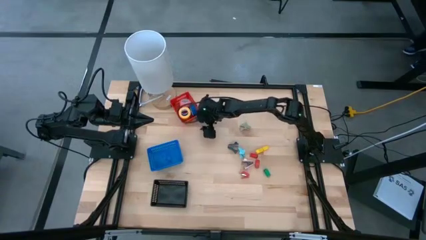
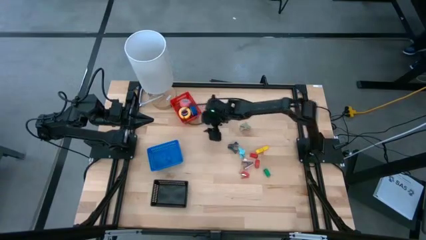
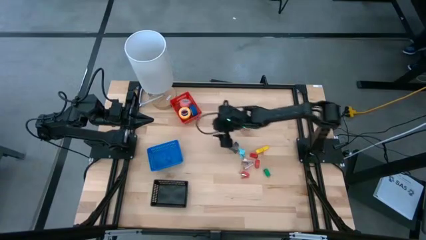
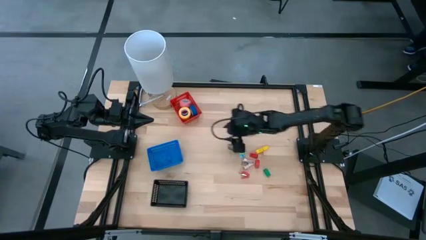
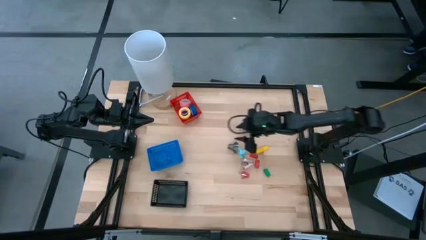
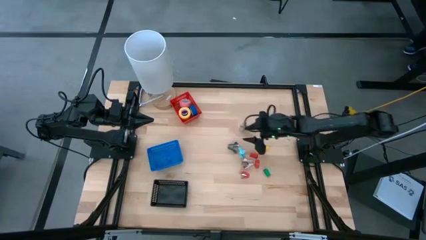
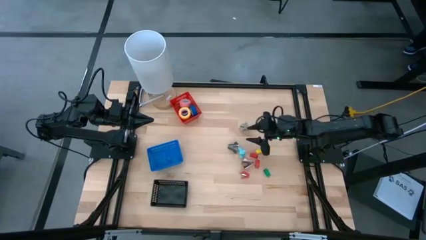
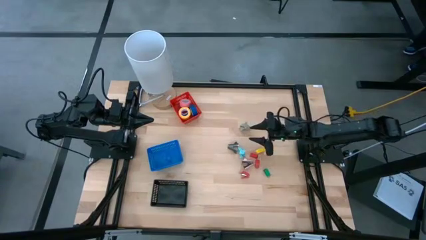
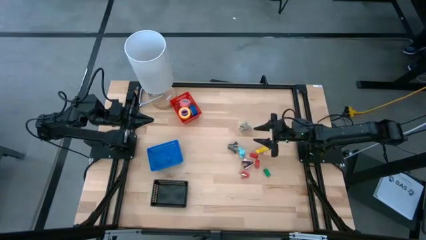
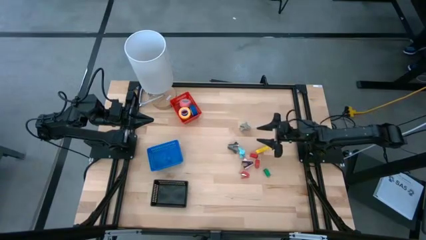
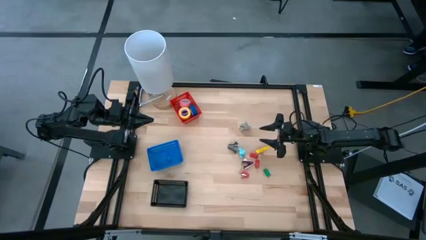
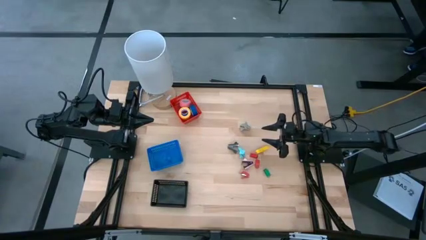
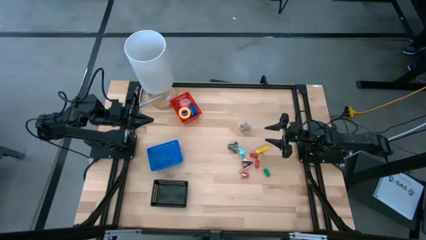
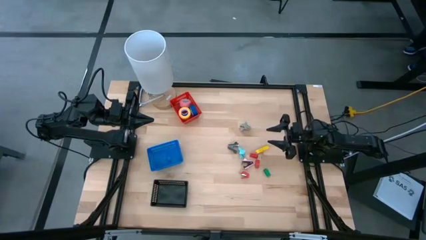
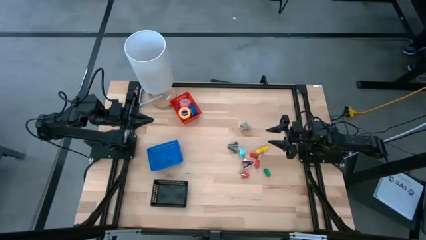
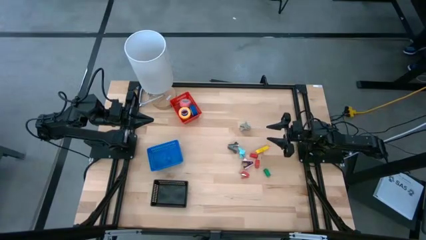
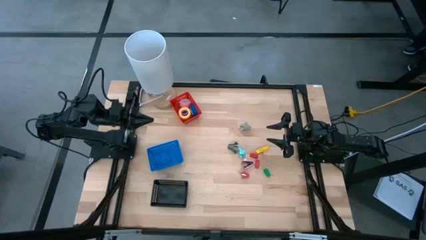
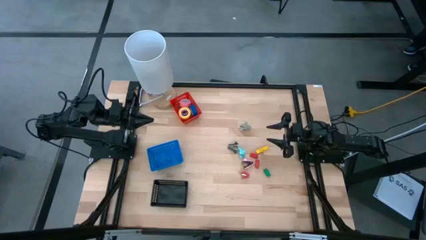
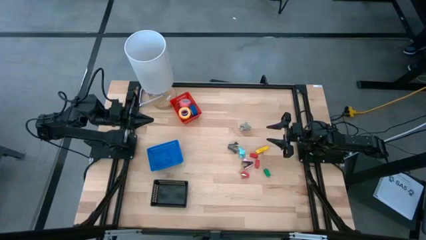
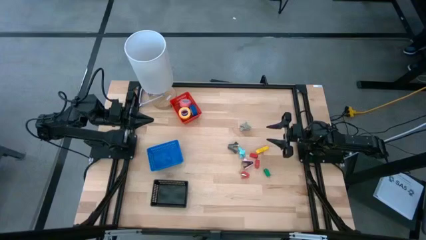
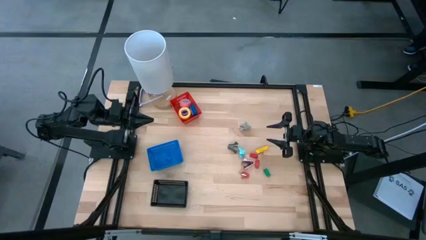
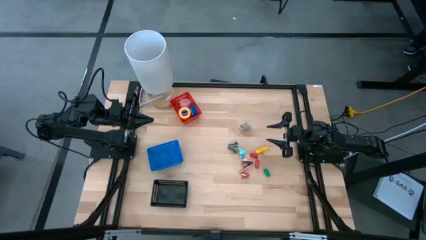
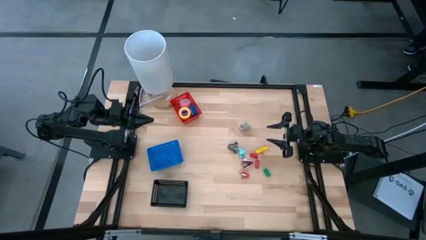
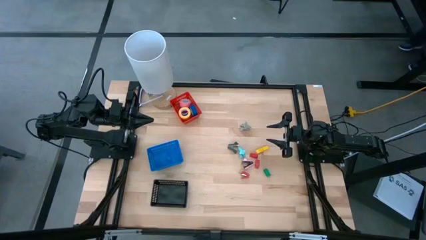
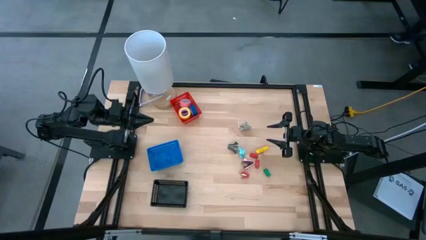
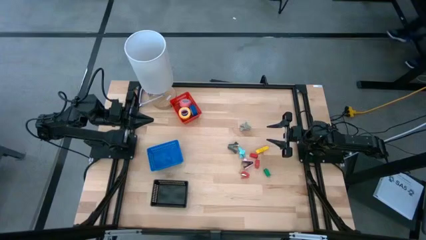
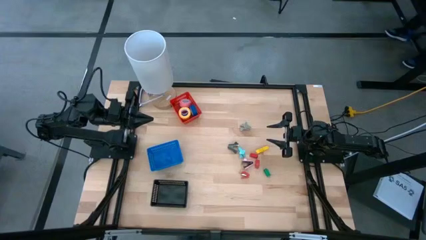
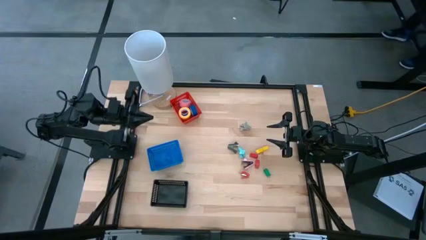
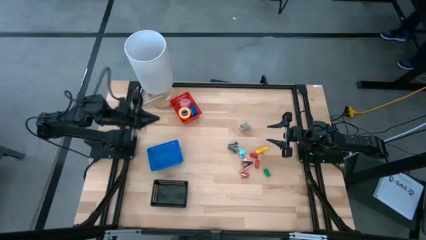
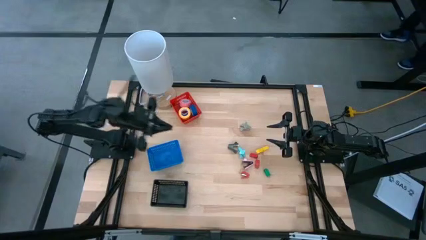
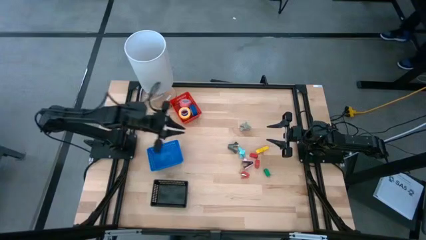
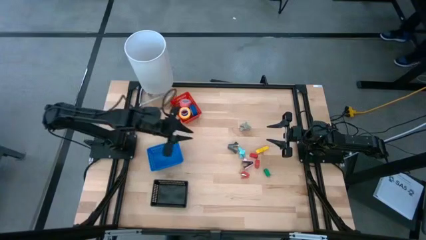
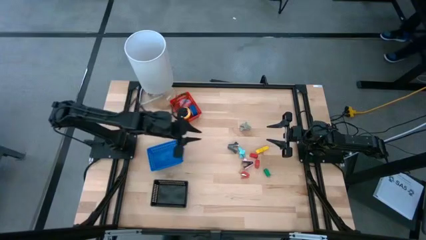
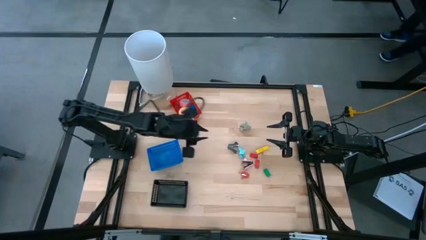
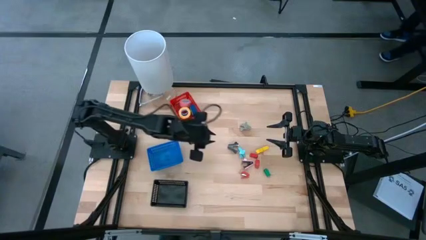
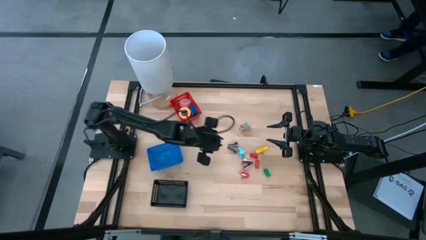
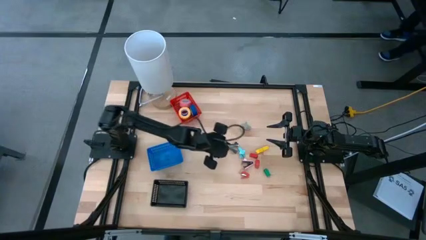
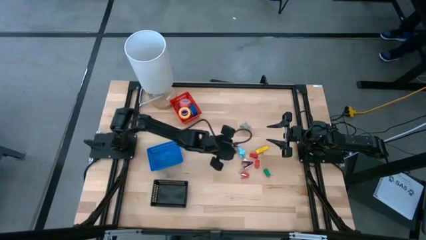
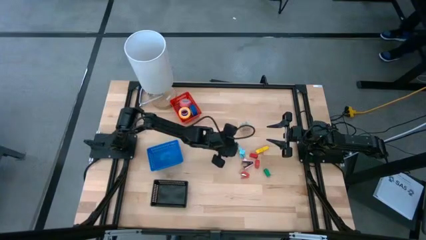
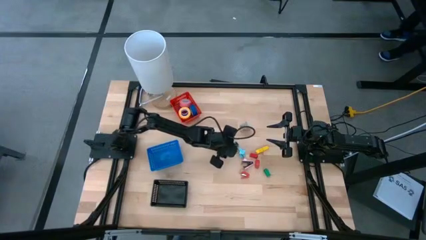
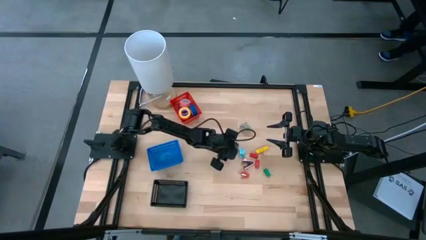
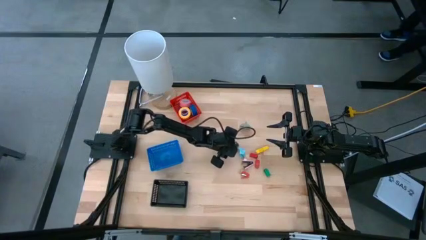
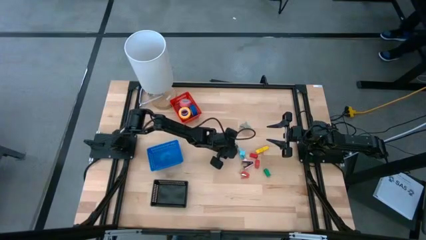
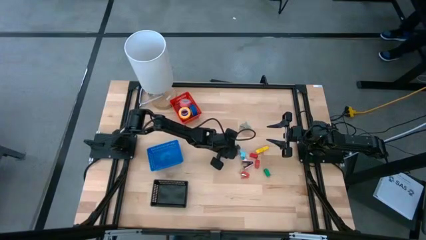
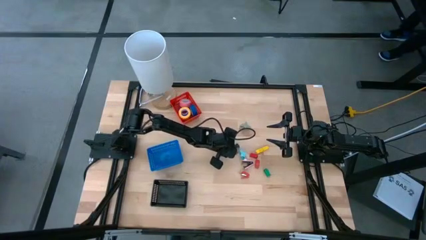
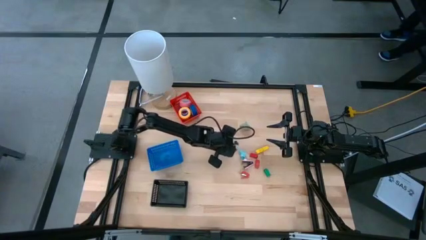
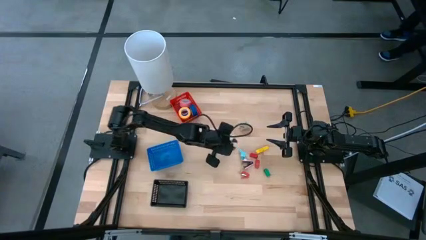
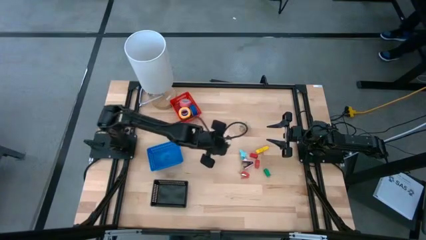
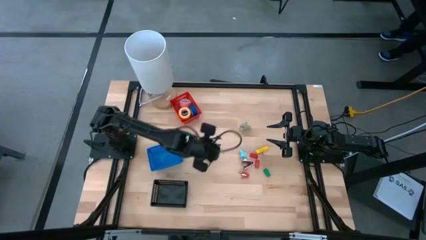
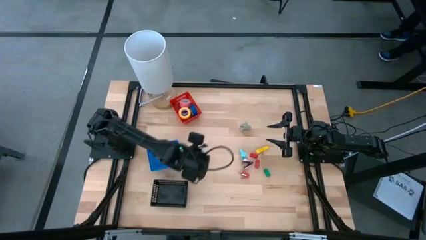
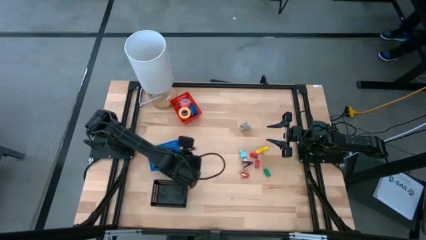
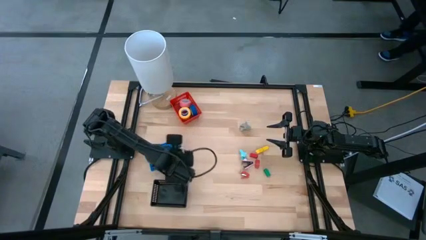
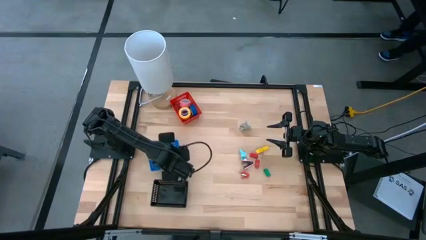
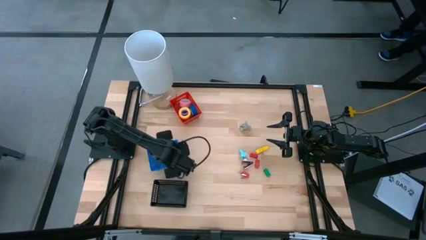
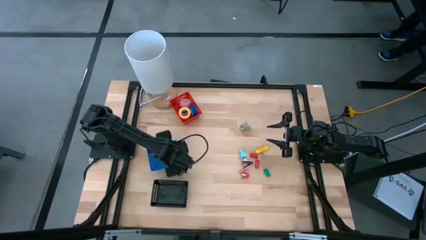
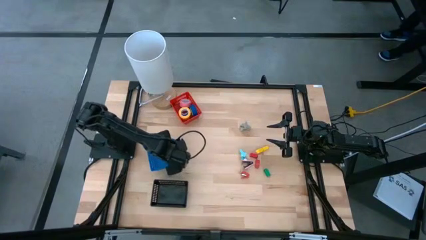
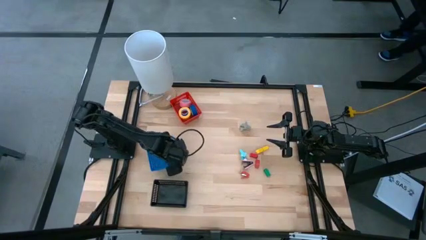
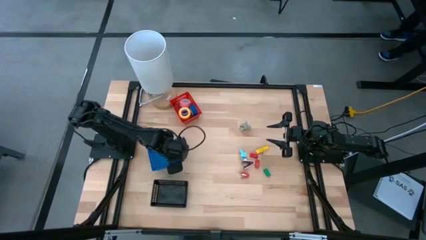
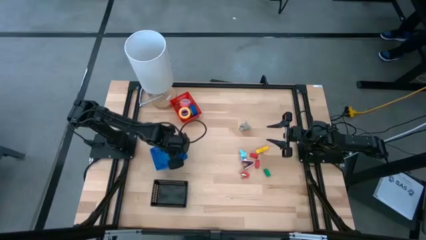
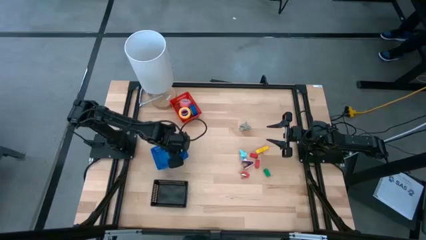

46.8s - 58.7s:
Task: Pick and place Stapler, Stapler remover, tape
Put the black staple remover into the blue basket

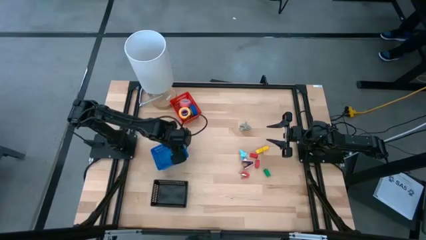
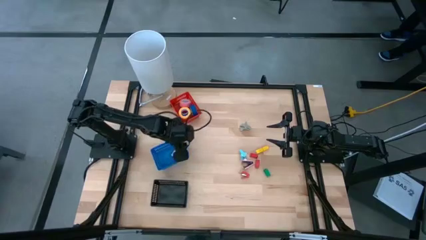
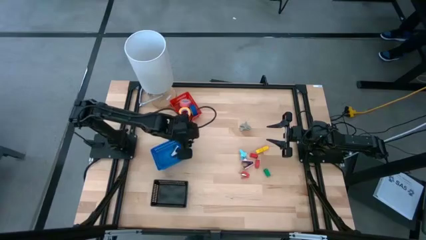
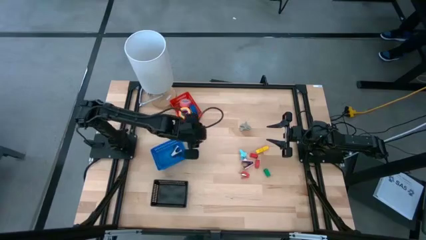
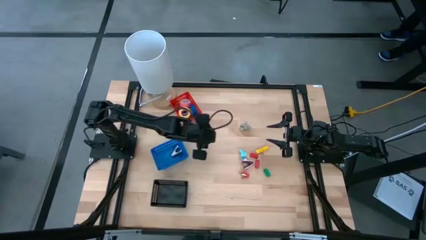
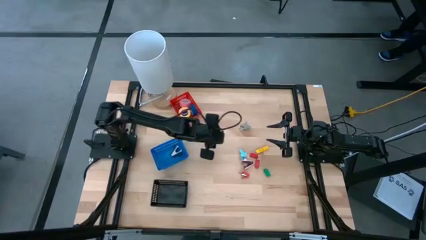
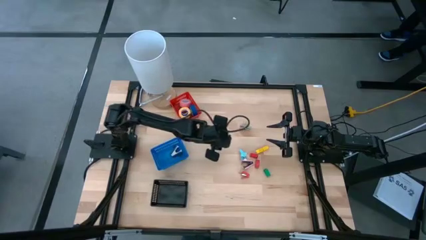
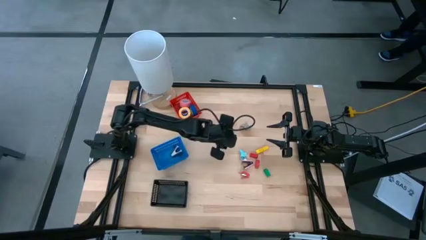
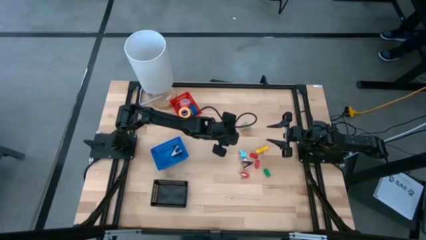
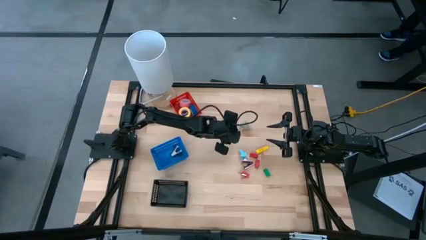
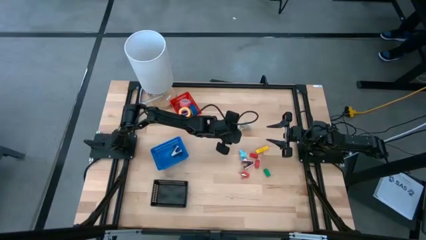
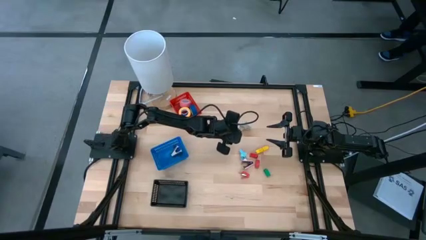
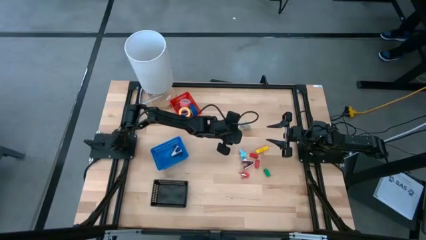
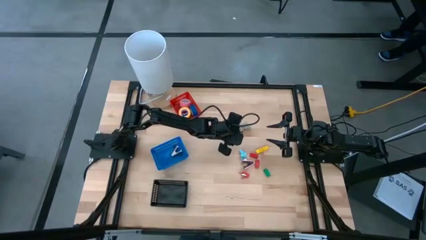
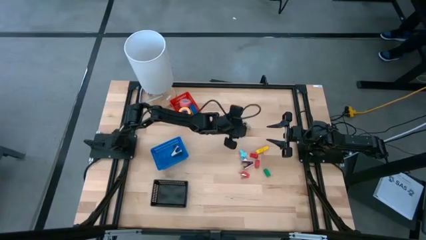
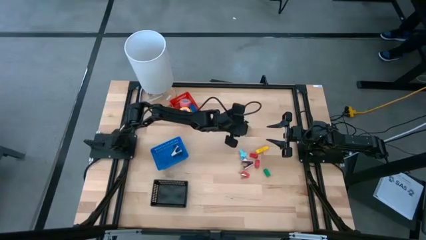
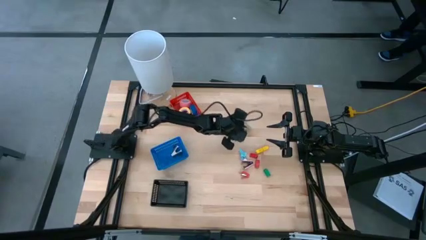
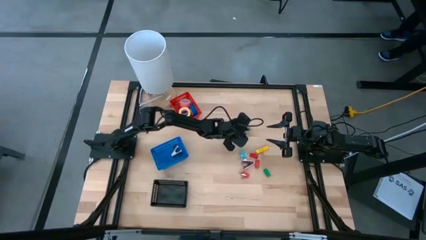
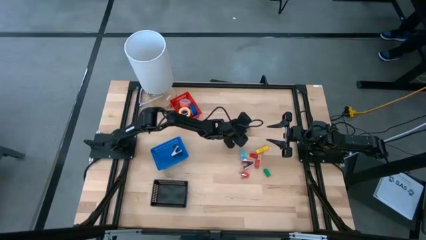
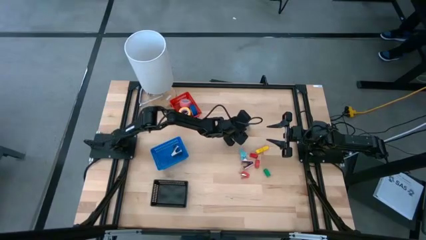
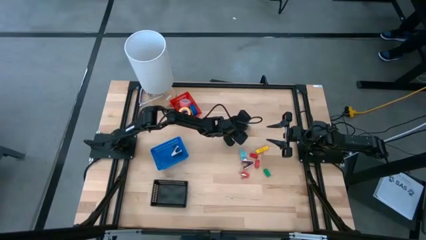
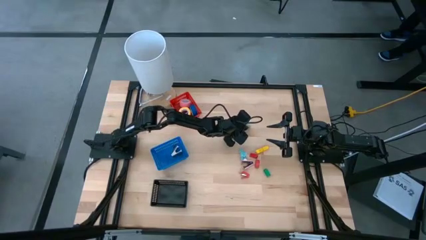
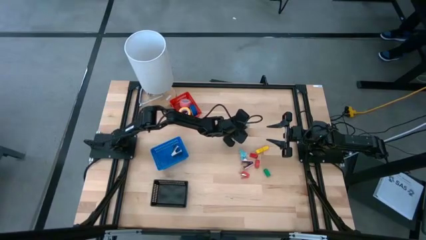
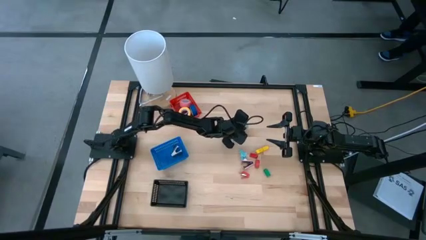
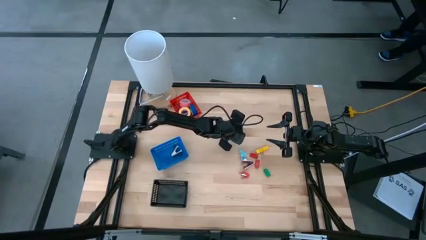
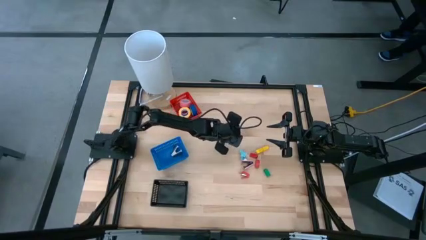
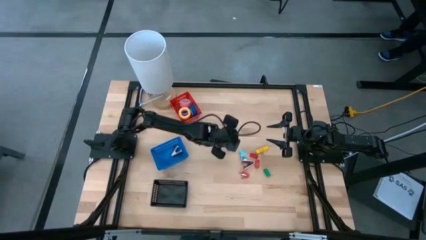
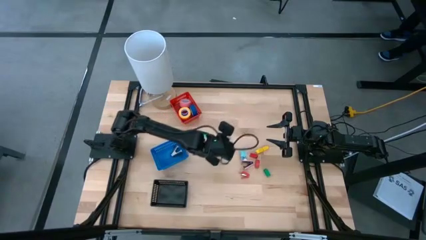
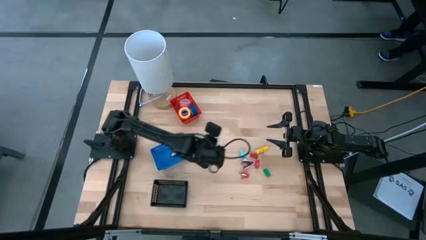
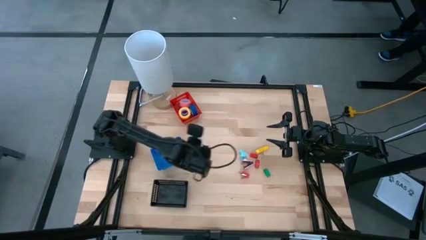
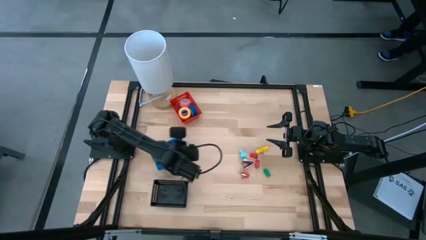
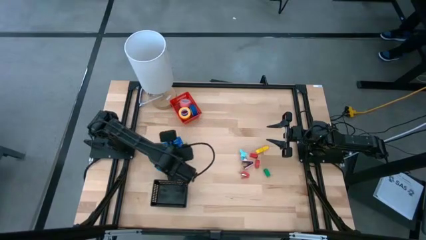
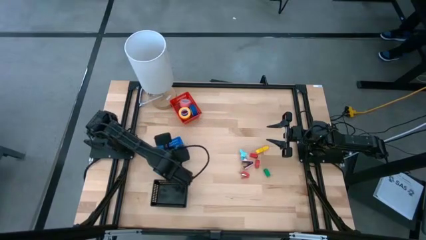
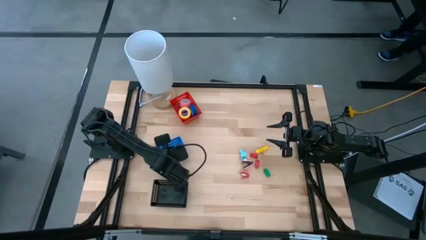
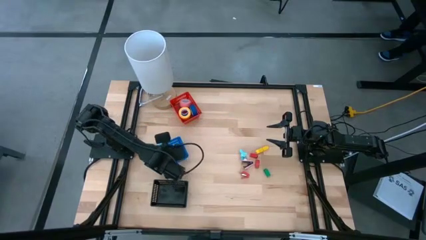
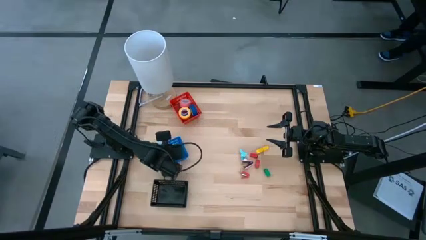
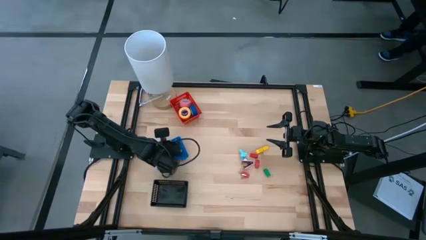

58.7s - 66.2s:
Put the gray staple remover into the blue basket
